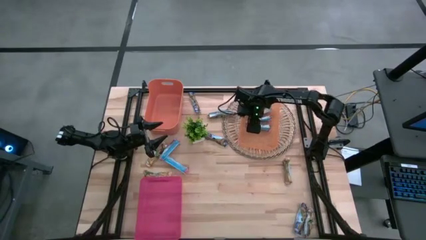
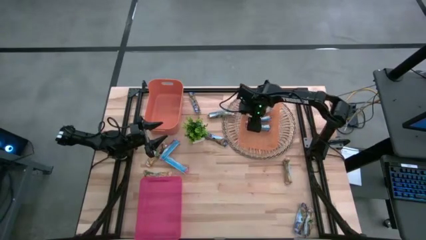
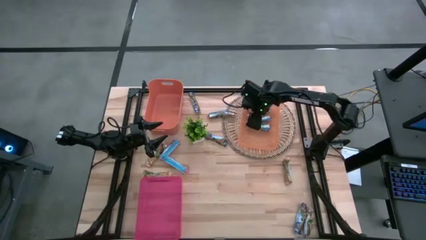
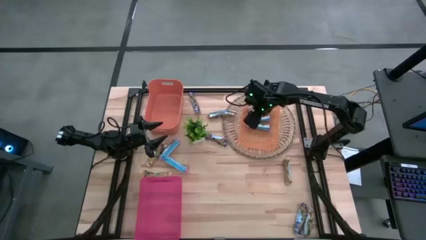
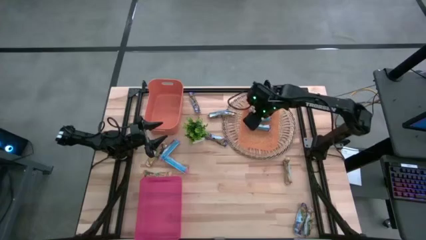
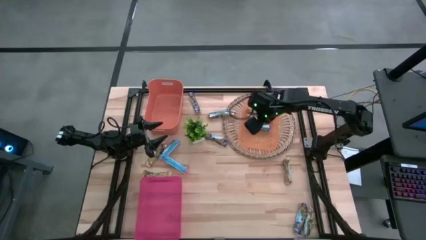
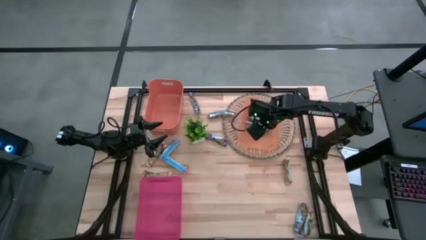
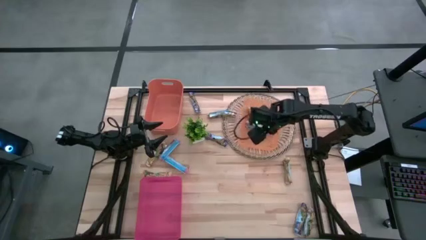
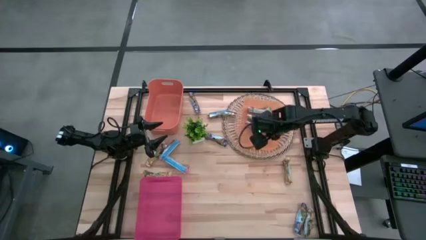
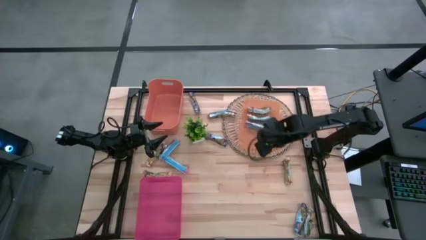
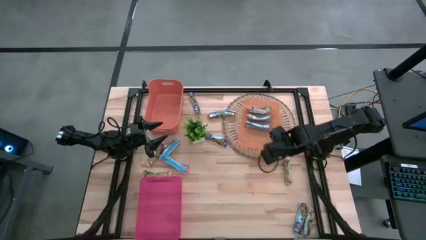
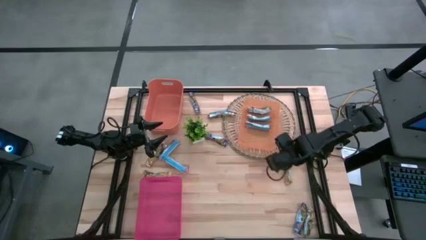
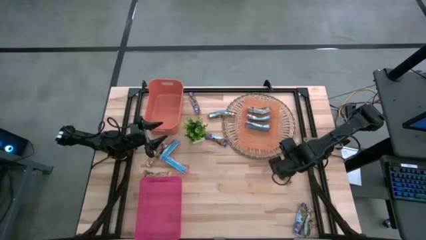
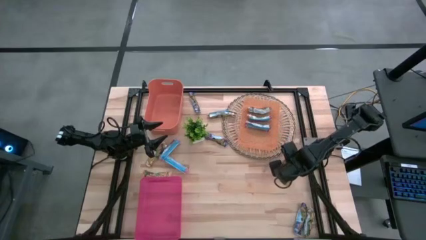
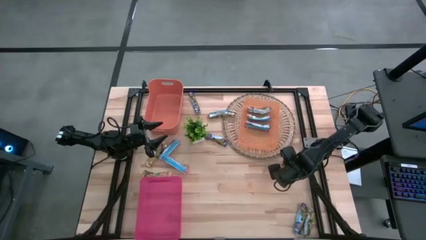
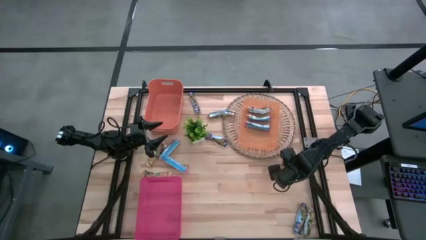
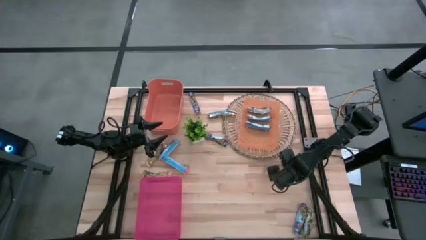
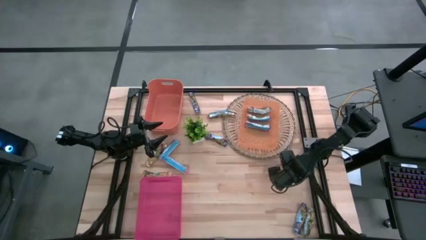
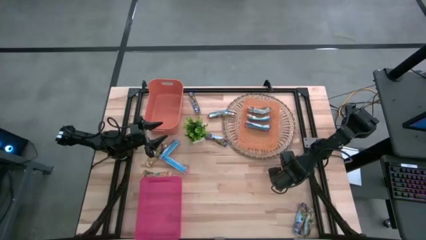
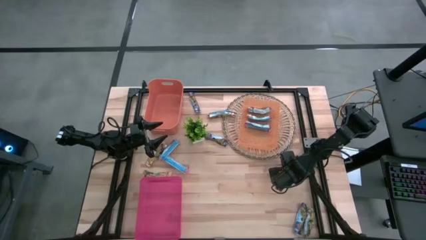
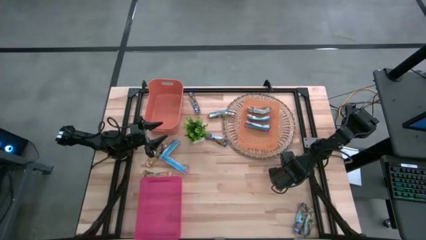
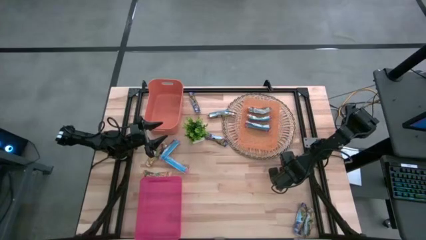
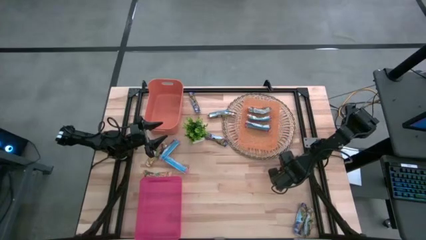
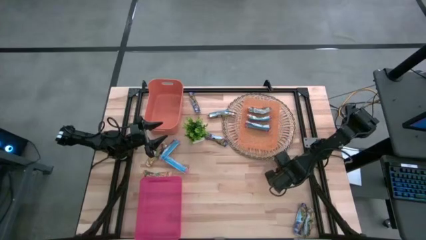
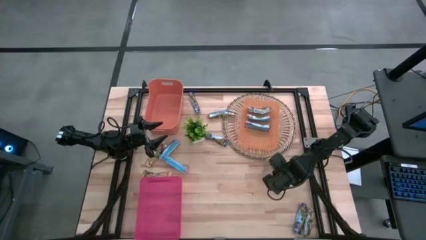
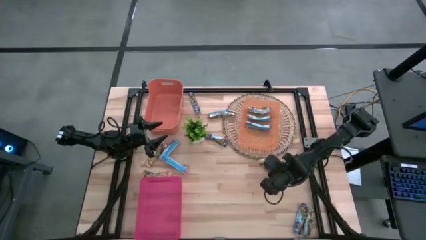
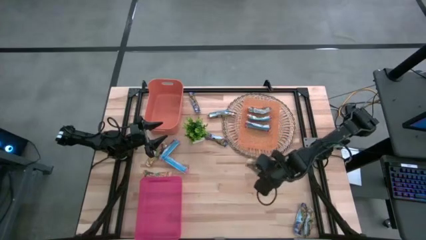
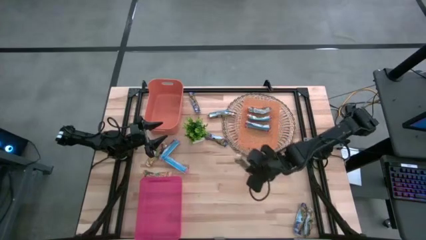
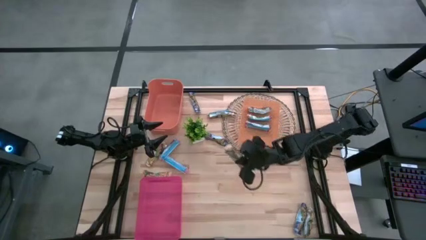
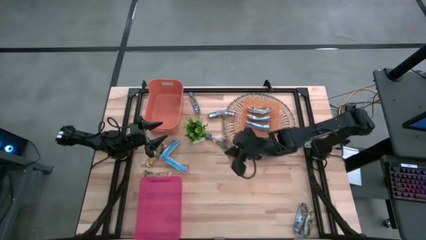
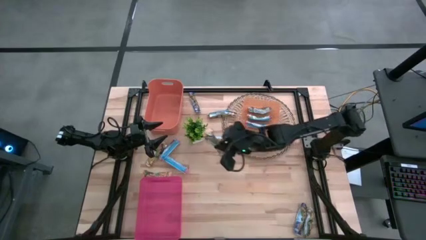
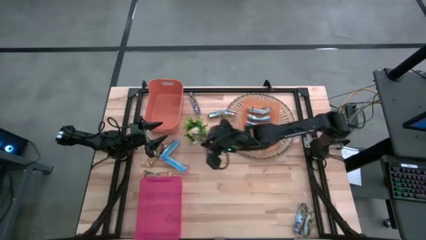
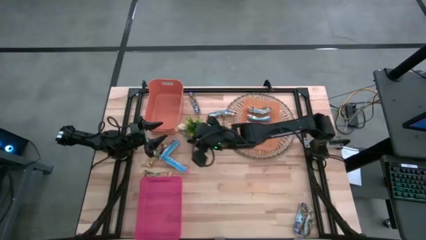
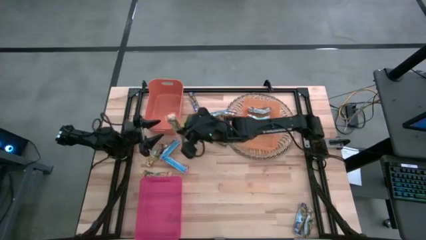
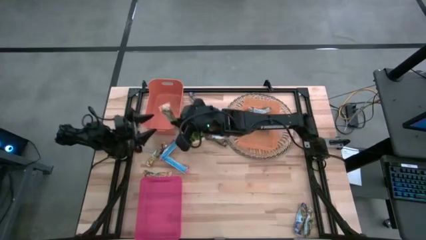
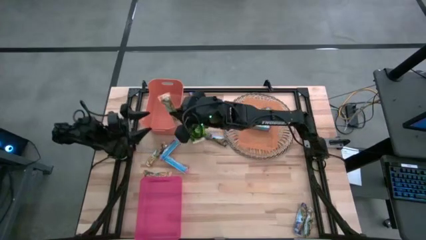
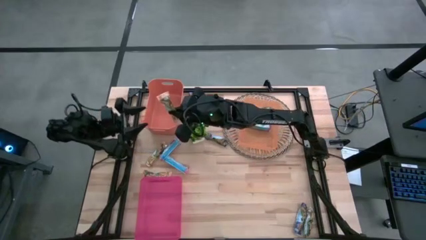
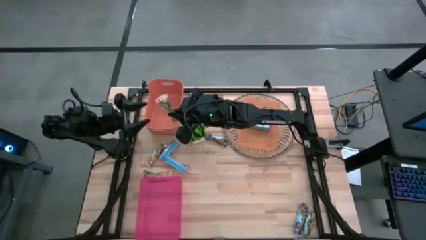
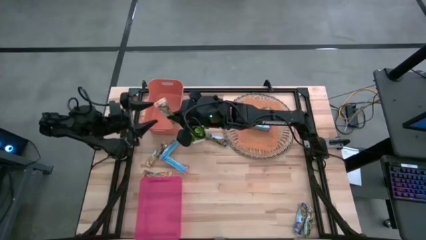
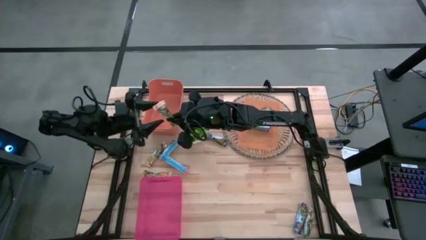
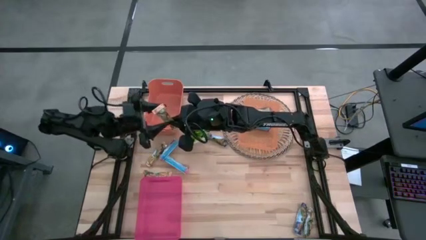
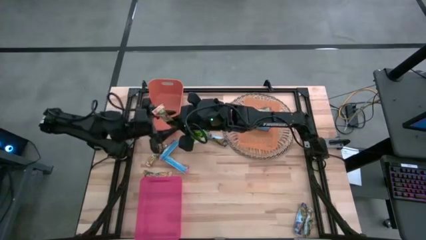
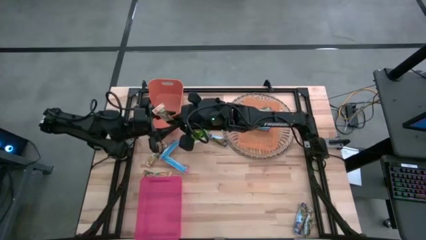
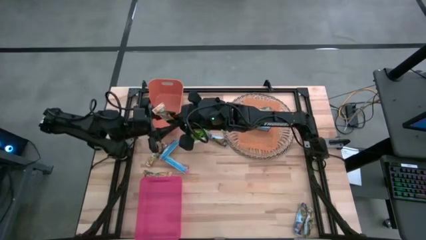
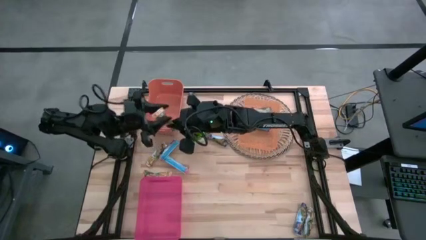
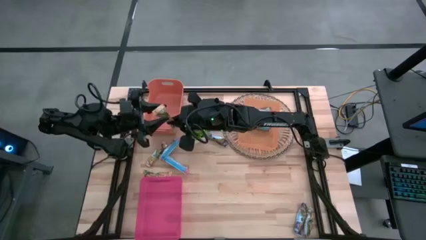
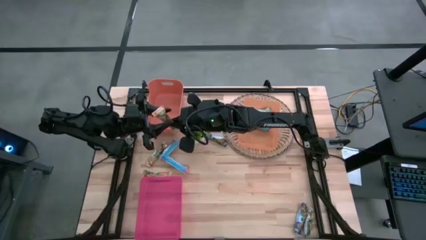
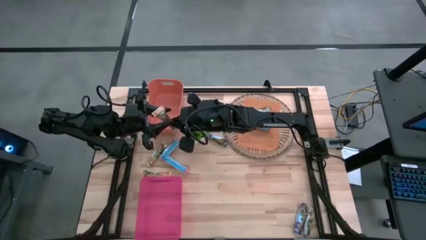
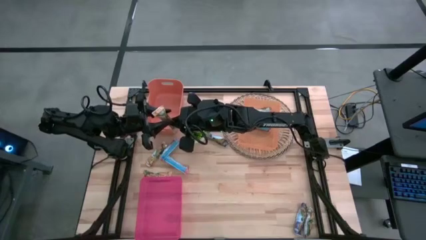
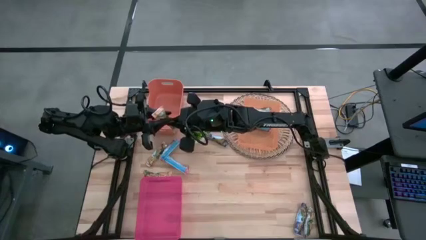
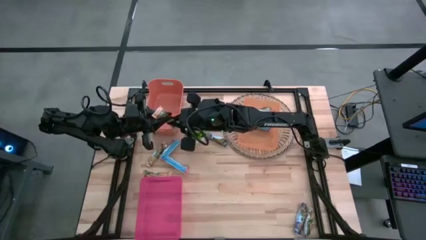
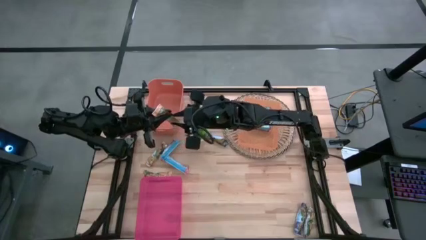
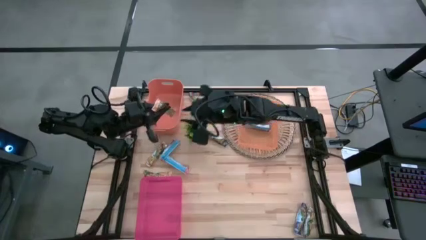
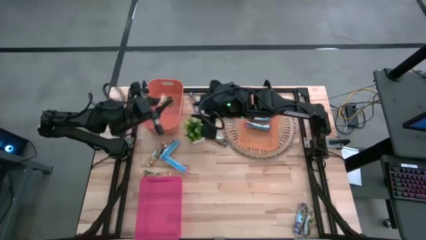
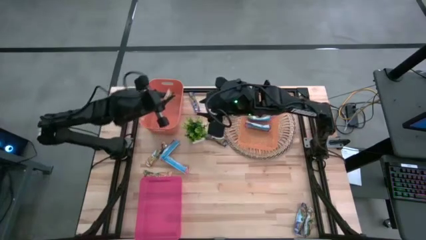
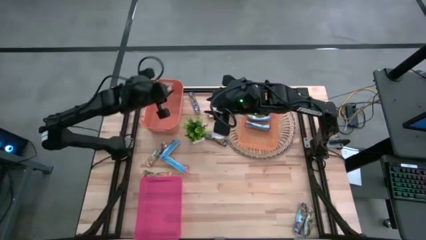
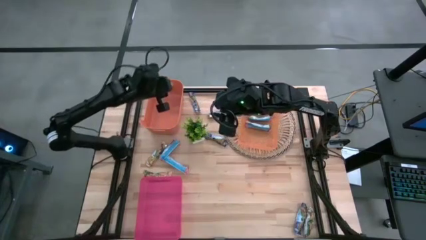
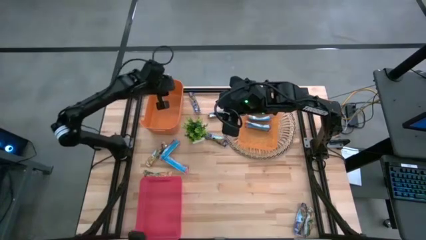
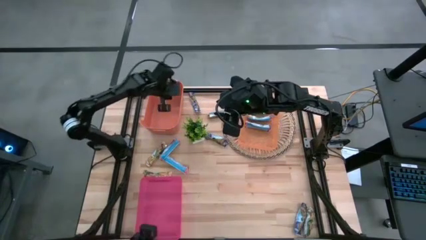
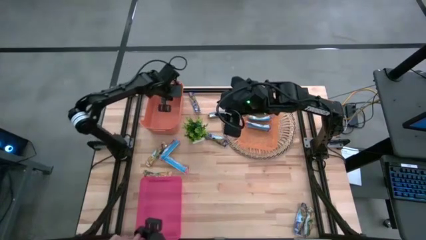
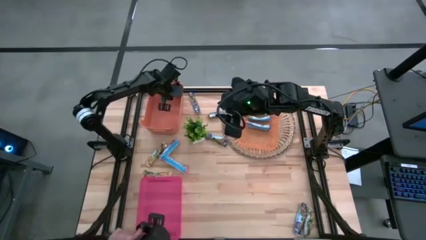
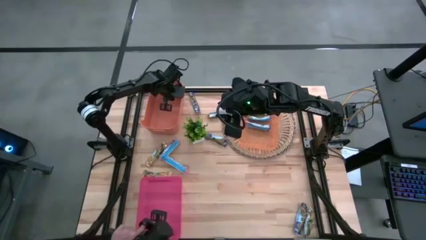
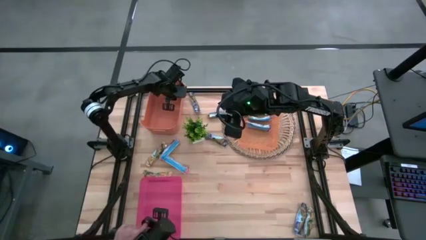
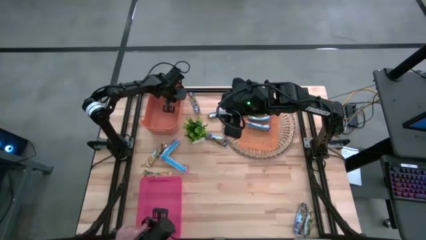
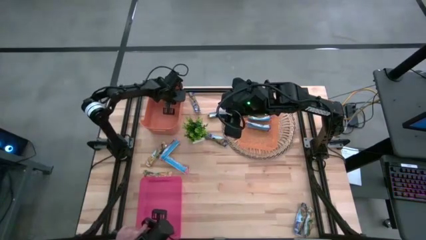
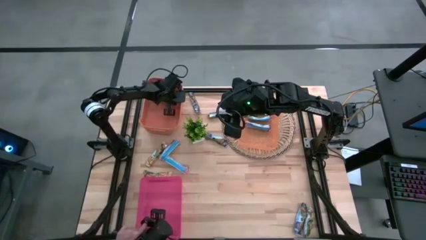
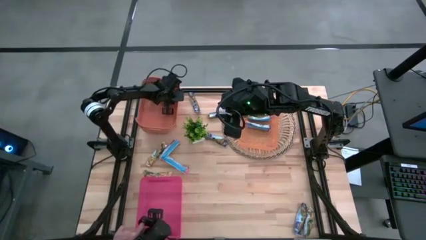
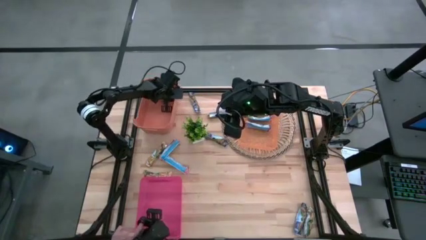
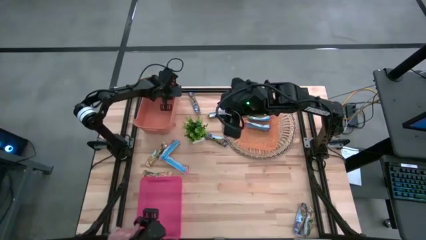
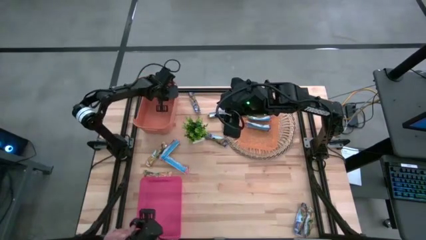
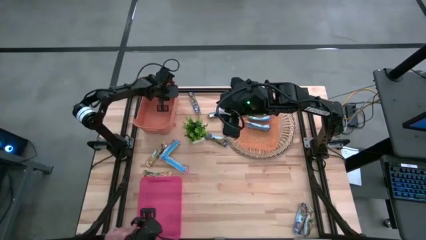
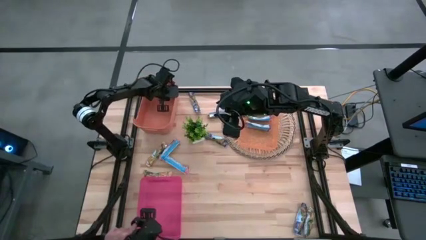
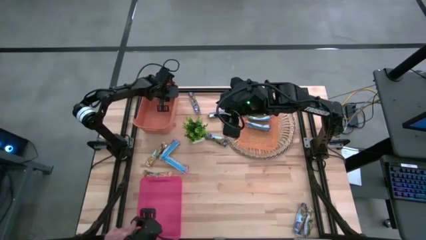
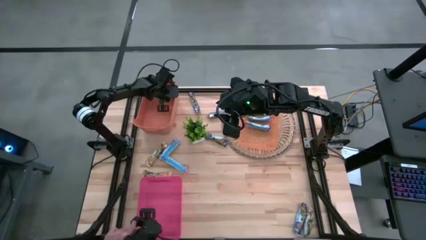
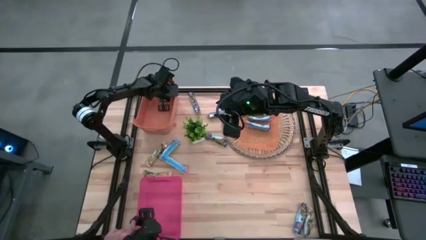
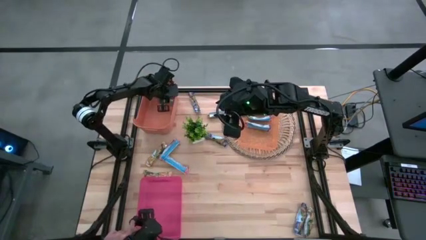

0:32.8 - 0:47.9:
Task: Pick and place Granola Bars by type
Put the yellow granola bar into the left orange bin
